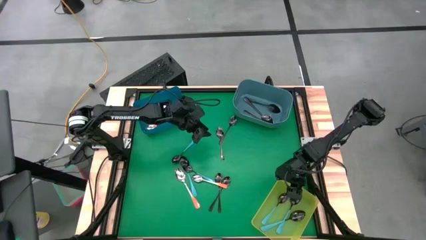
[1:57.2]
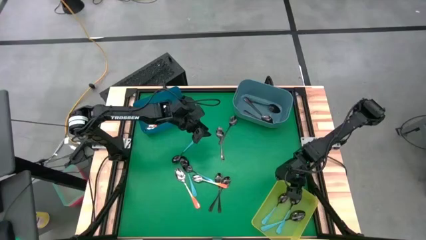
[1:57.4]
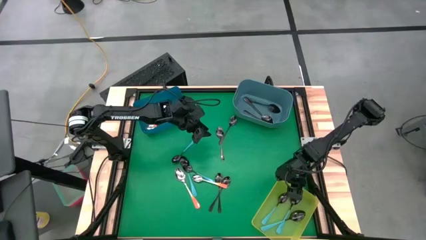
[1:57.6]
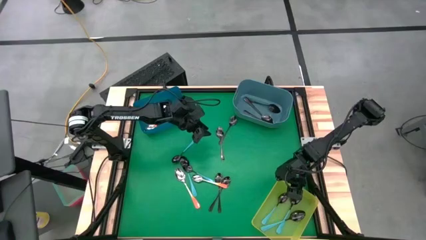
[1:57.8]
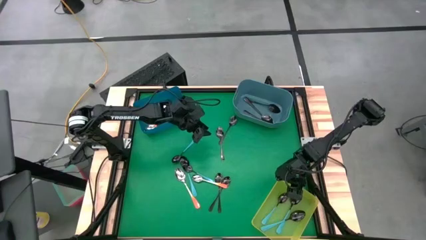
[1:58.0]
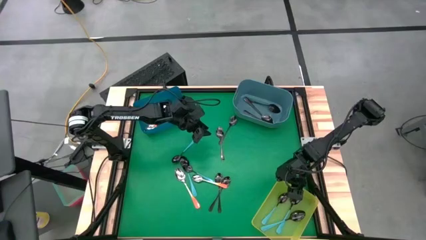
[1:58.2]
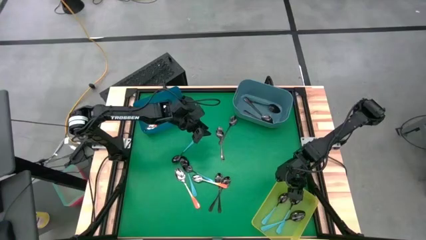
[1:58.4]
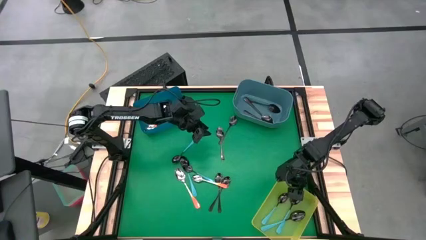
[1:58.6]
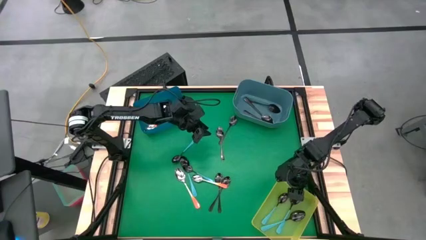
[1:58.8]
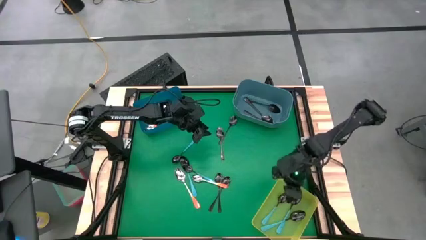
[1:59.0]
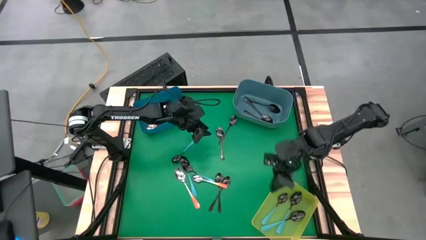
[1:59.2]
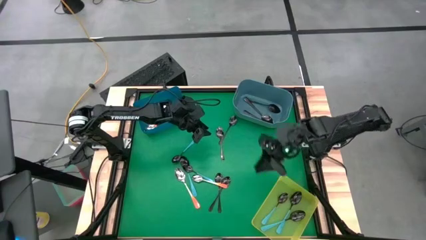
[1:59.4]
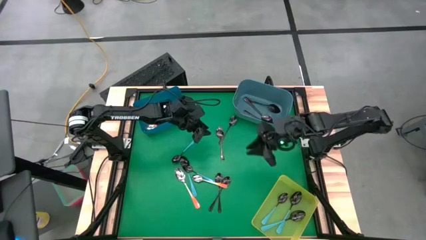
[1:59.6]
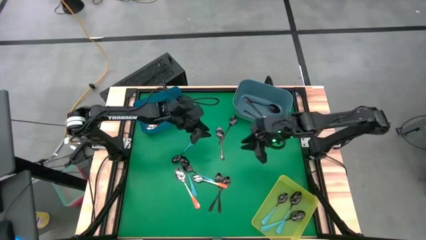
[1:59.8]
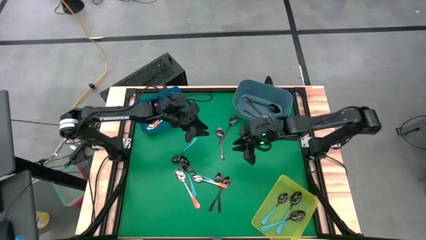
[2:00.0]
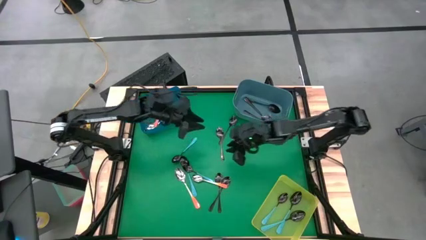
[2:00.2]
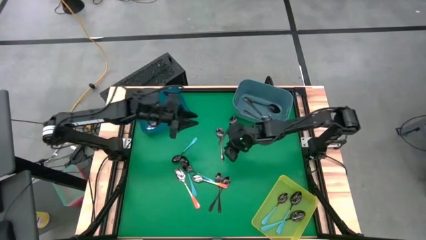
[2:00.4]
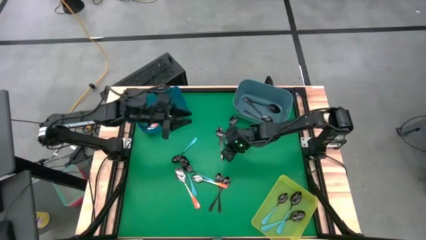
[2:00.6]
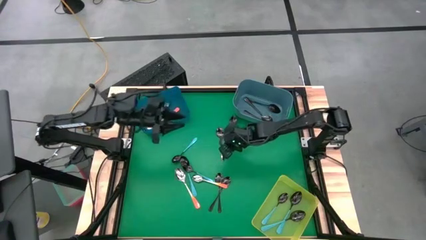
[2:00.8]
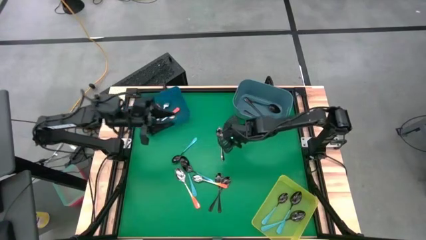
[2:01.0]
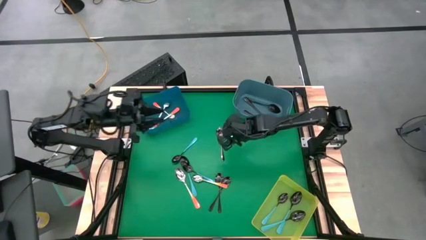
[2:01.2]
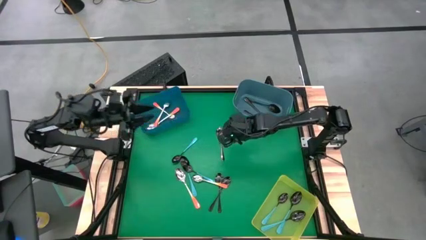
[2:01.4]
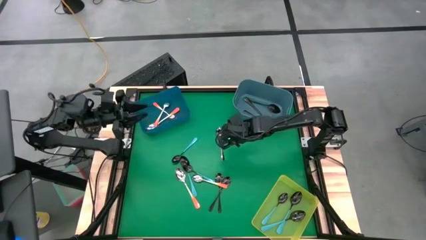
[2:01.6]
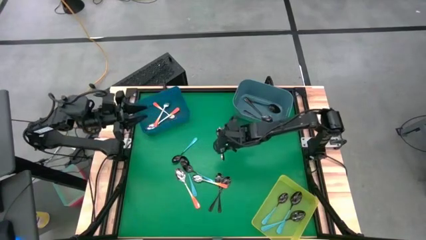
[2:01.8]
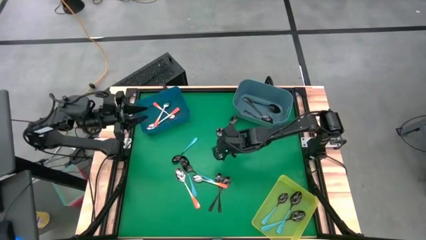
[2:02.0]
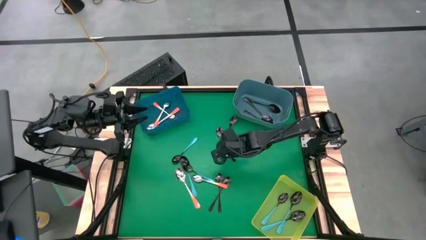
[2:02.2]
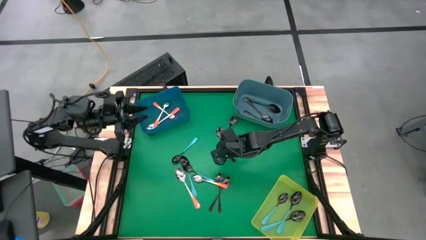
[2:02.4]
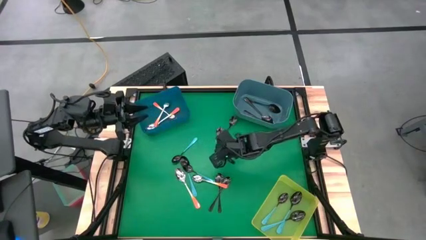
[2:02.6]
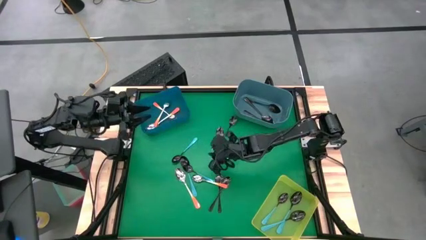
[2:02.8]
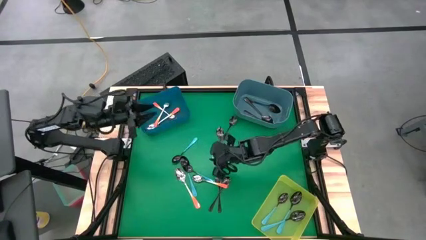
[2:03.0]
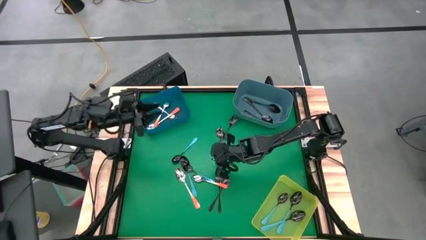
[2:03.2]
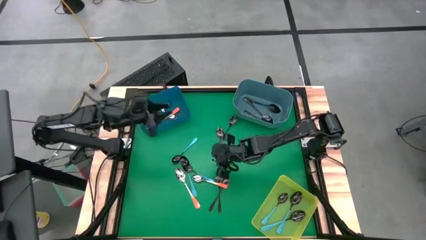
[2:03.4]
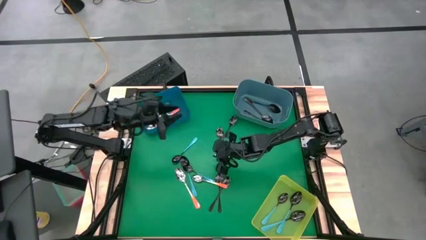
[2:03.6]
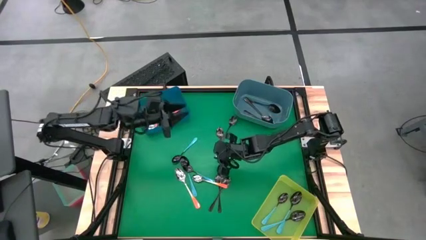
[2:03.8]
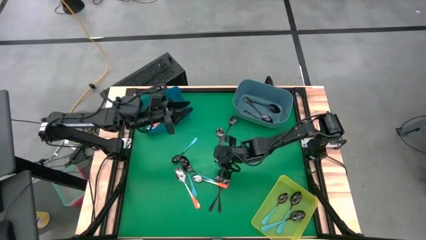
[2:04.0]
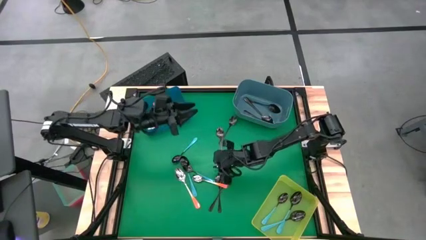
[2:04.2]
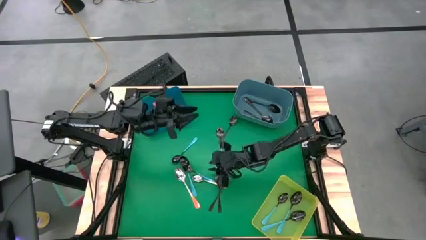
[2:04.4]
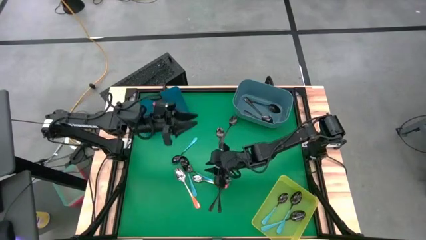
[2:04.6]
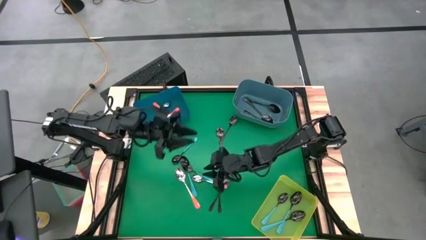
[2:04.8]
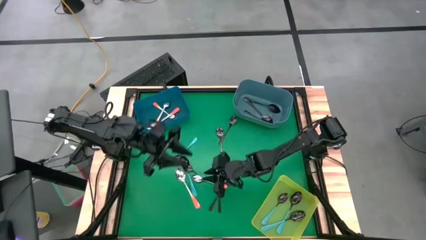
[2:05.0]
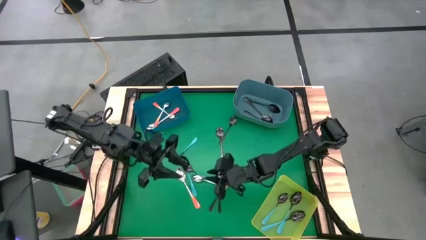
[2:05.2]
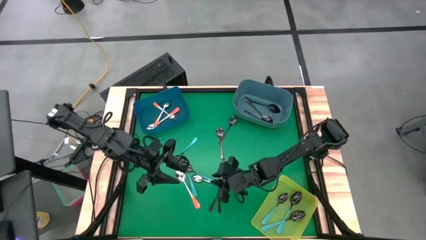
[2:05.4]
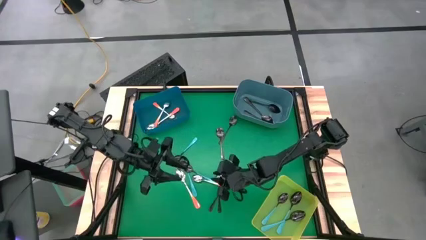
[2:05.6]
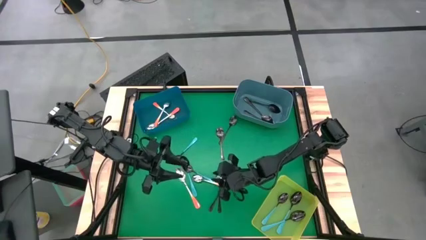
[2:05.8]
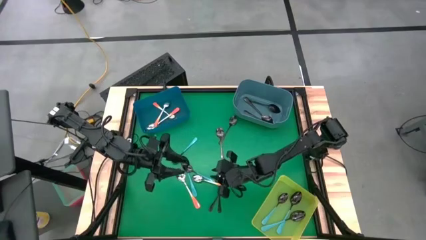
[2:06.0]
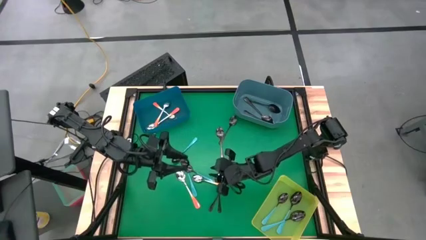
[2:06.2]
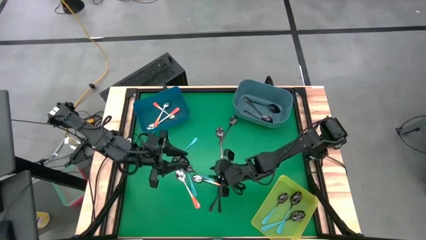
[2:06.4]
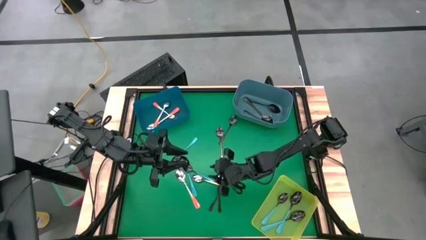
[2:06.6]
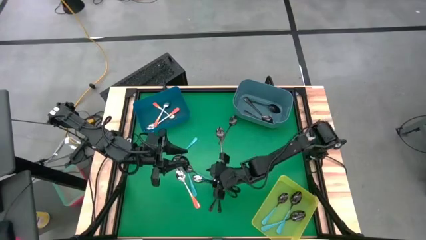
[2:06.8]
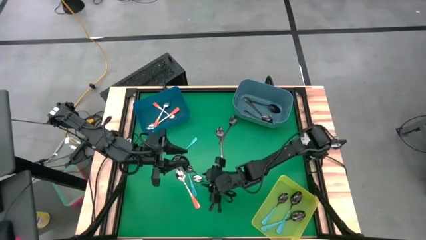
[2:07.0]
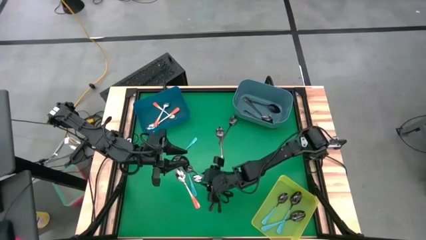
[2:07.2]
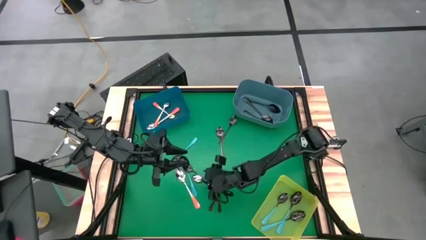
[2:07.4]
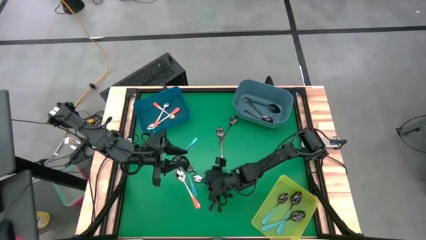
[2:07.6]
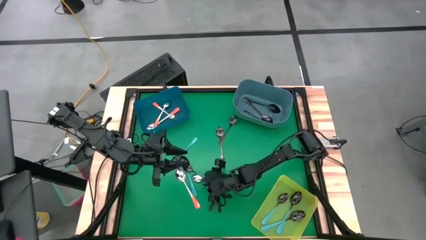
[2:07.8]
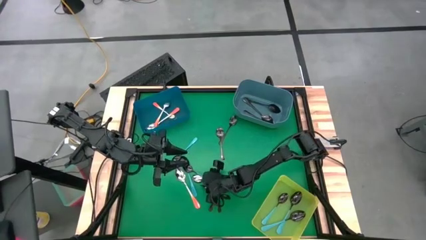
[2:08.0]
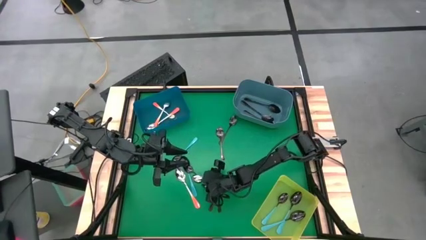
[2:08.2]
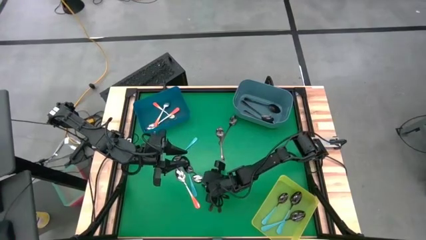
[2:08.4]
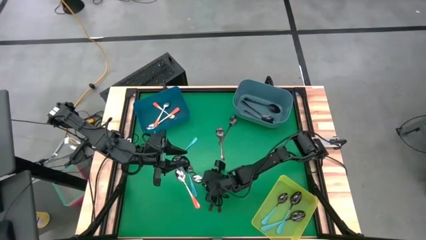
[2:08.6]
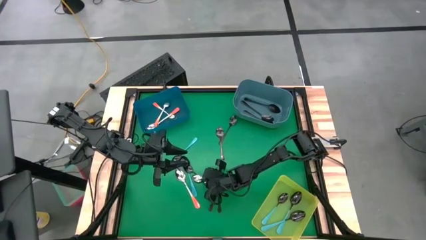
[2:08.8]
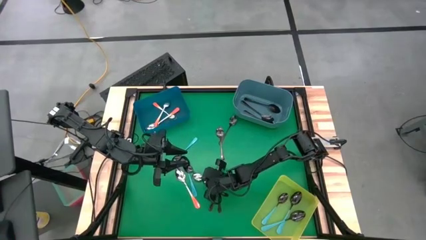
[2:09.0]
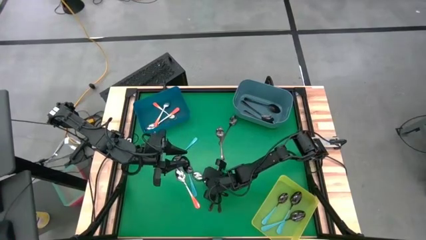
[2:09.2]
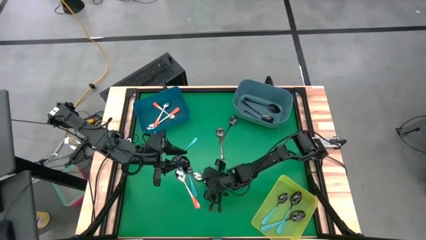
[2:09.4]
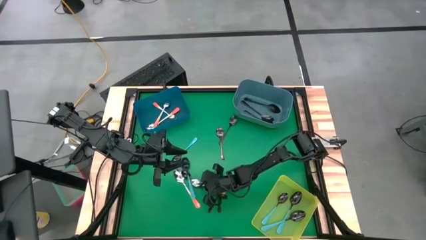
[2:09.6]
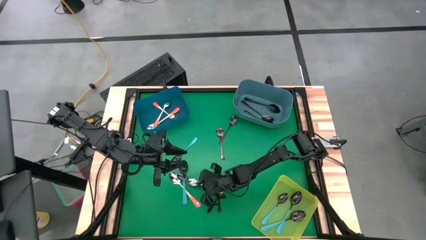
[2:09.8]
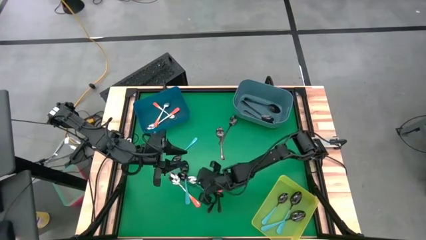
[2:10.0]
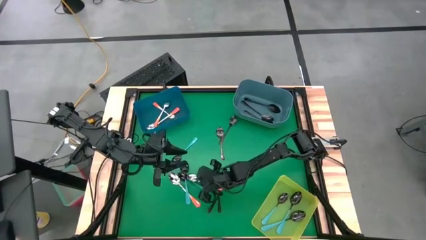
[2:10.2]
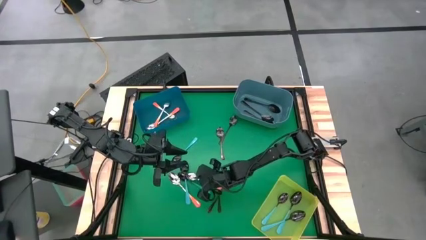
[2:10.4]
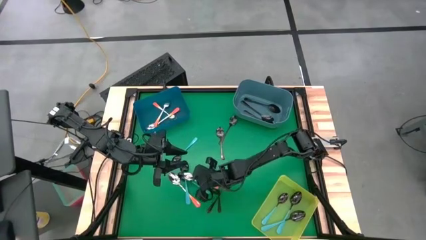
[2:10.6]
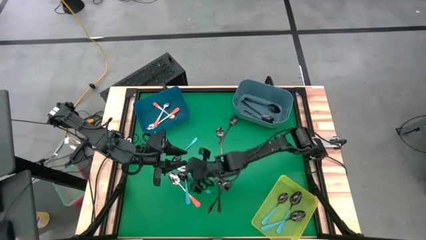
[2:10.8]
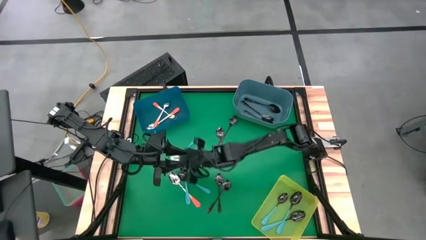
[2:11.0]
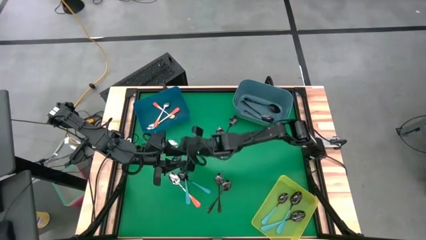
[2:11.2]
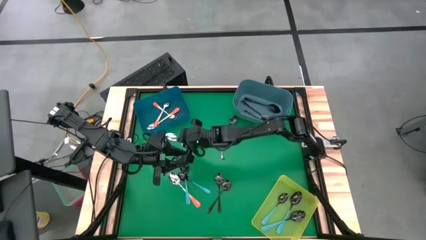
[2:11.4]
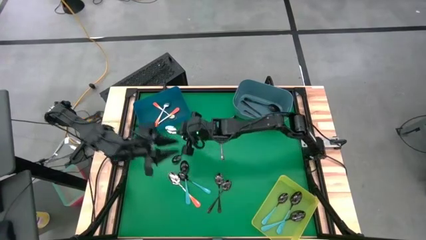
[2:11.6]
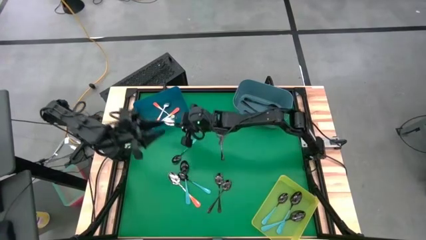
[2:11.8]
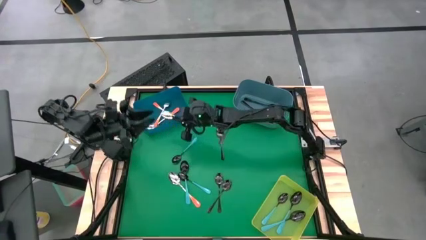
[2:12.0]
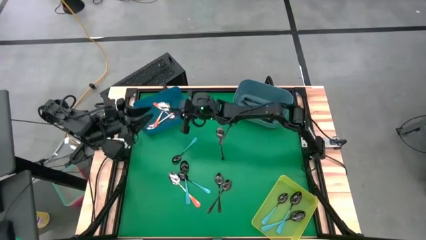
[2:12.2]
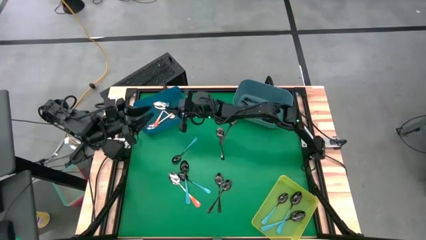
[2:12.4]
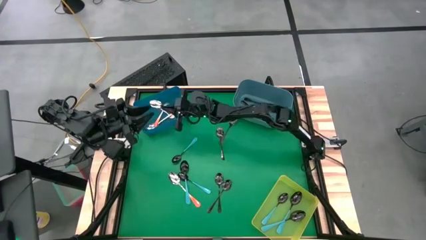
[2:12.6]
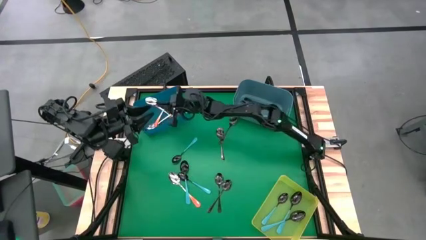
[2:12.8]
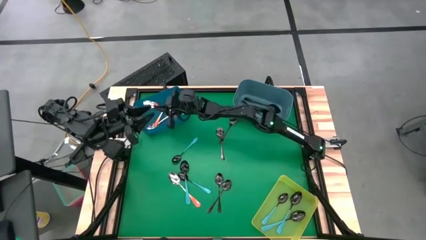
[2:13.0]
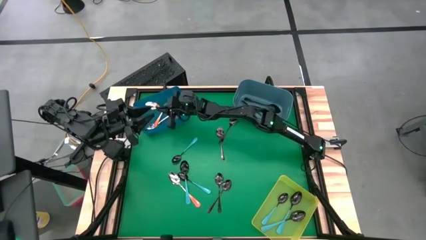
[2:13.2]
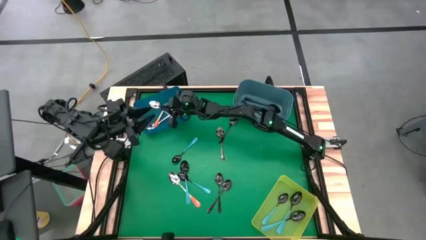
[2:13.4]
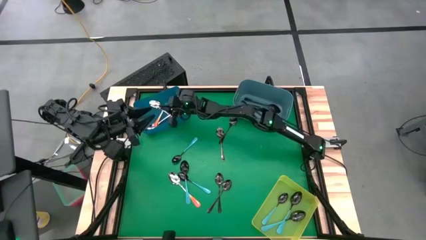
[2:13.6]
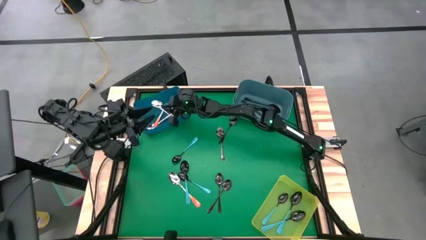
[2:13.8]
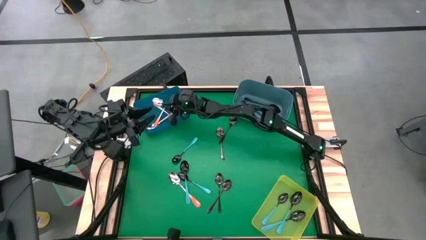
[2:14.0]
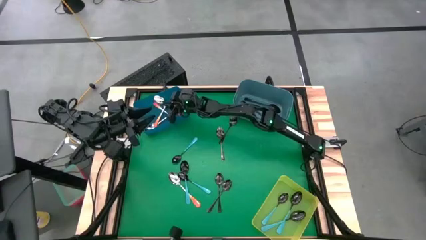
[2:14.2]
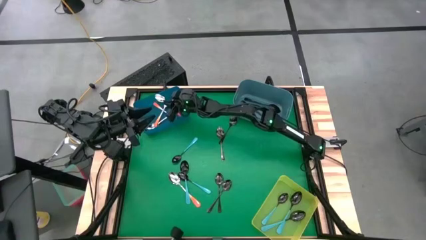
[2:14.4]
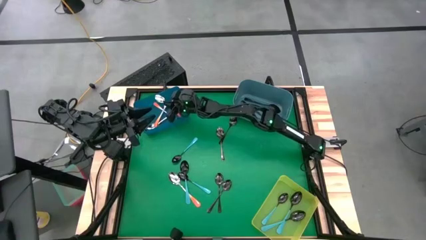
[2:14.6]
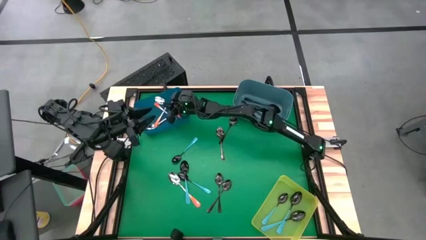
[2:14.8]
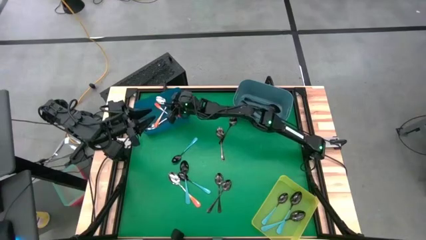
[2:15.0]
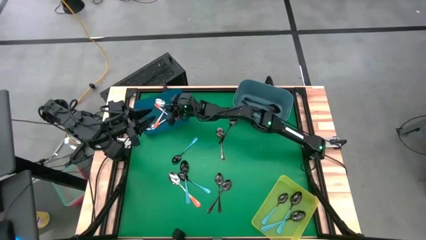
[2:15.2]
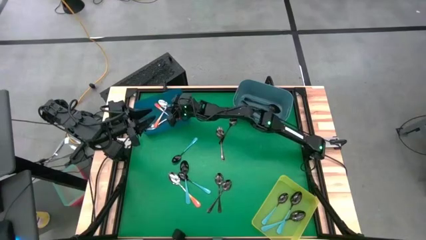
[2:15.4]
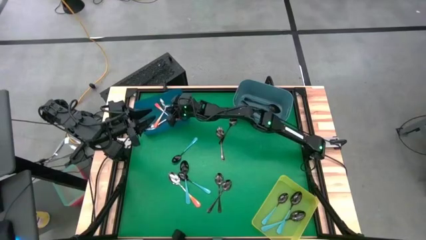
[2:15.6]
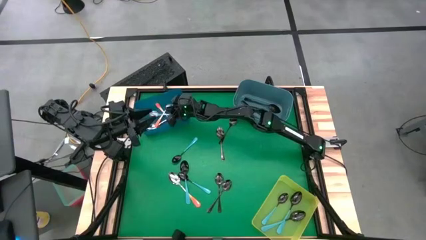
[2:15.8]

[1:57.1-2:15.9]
Task: Sort silverware by color (type)
Put the orange spoon into the dark blue bin
